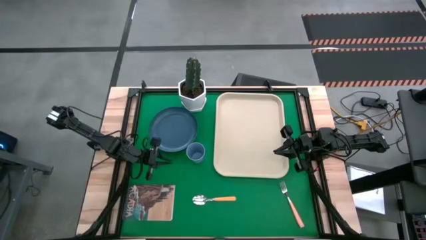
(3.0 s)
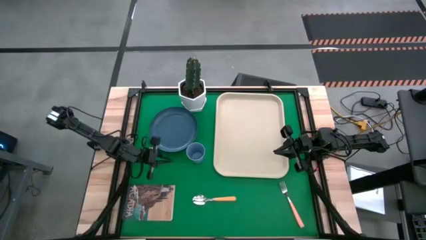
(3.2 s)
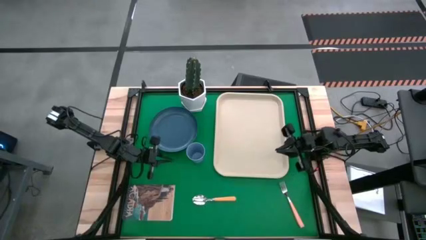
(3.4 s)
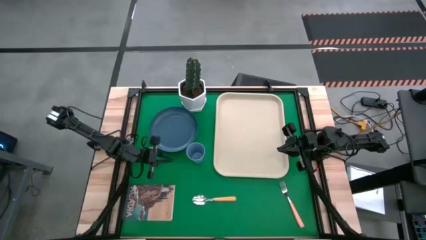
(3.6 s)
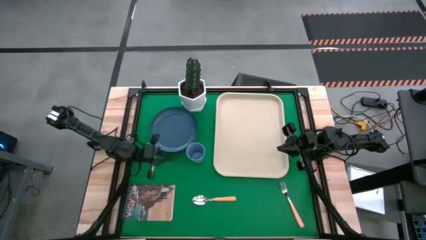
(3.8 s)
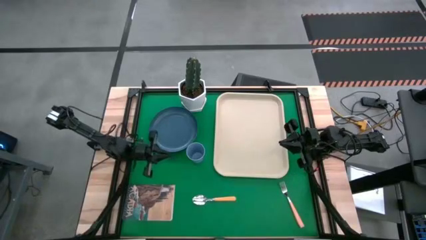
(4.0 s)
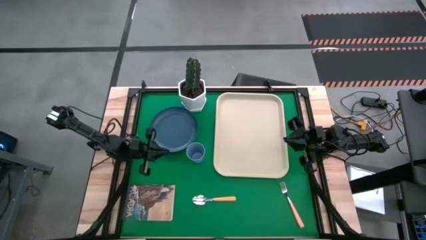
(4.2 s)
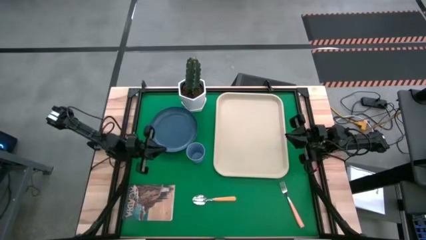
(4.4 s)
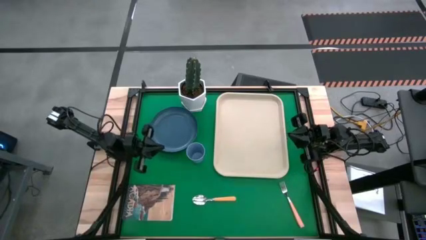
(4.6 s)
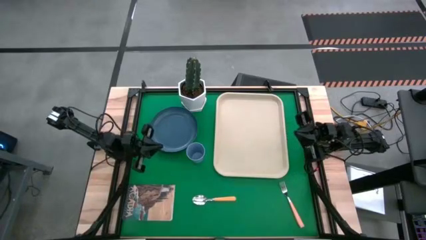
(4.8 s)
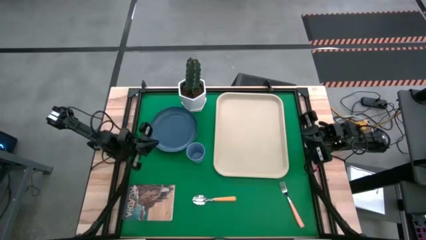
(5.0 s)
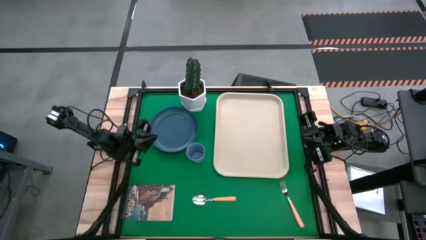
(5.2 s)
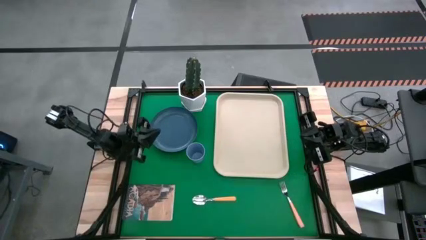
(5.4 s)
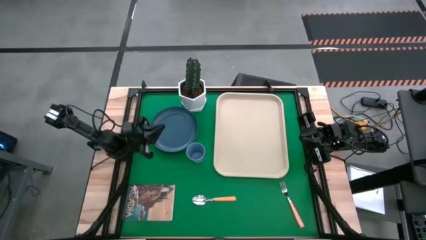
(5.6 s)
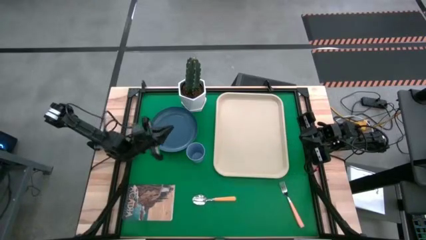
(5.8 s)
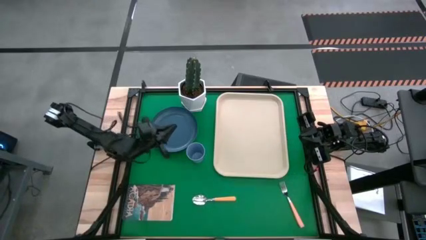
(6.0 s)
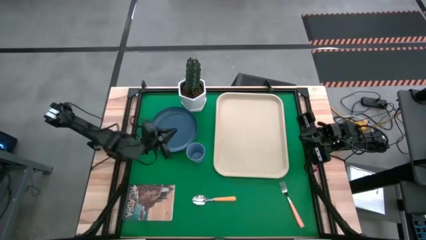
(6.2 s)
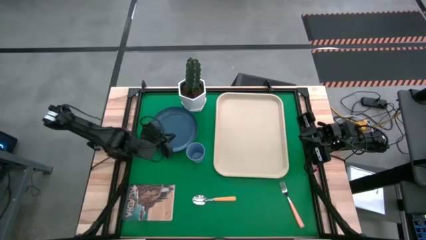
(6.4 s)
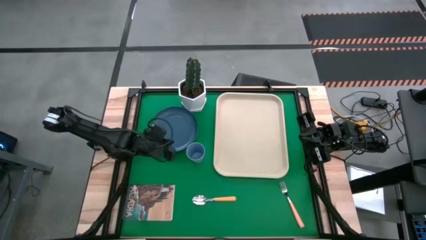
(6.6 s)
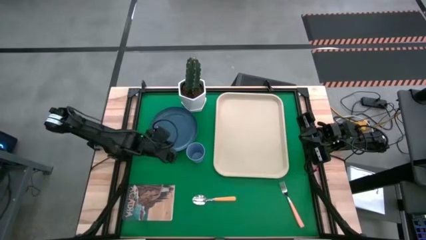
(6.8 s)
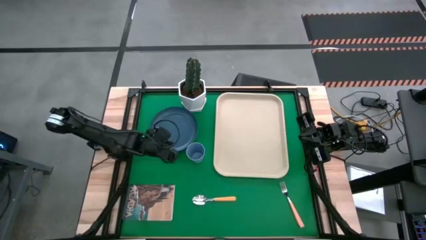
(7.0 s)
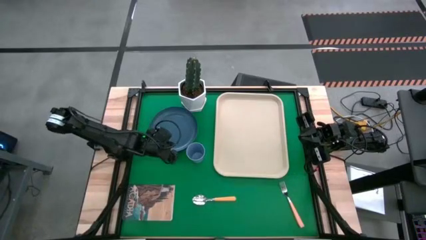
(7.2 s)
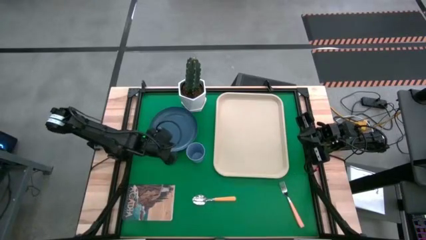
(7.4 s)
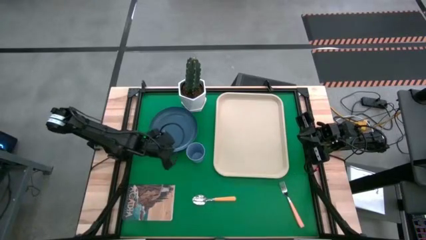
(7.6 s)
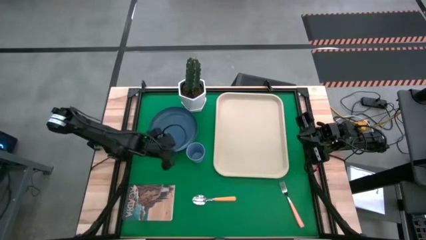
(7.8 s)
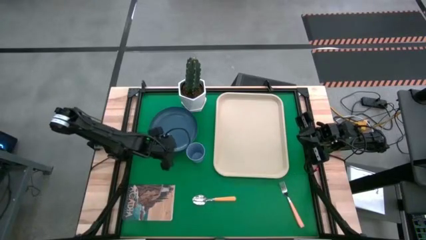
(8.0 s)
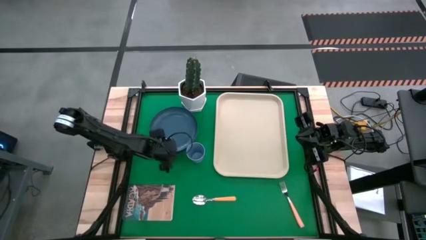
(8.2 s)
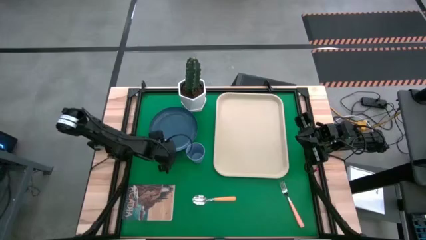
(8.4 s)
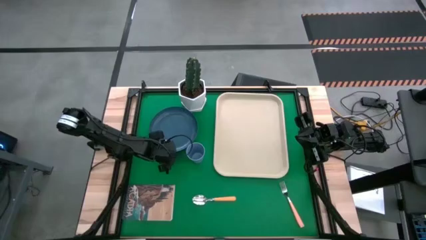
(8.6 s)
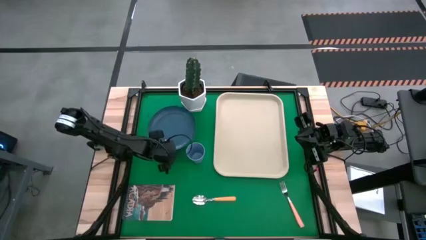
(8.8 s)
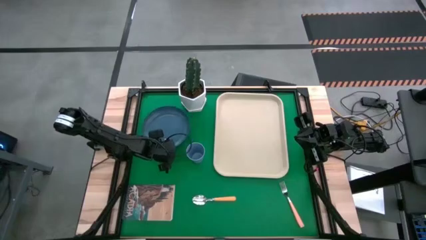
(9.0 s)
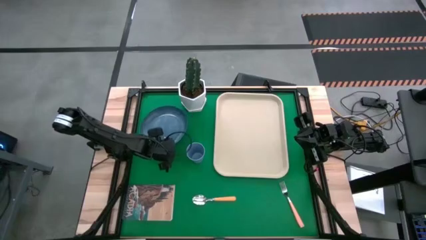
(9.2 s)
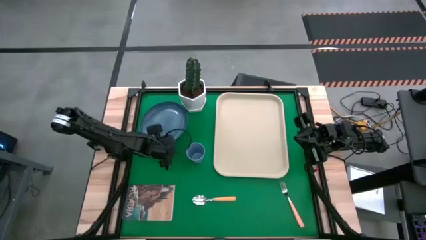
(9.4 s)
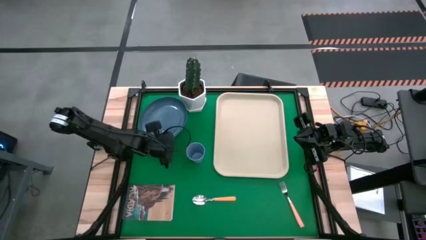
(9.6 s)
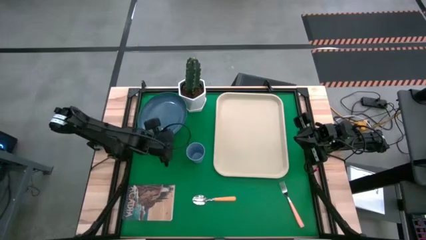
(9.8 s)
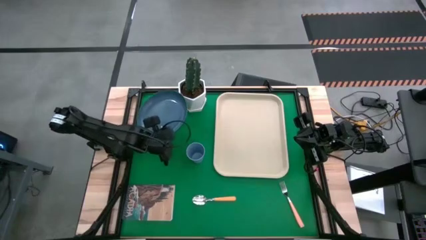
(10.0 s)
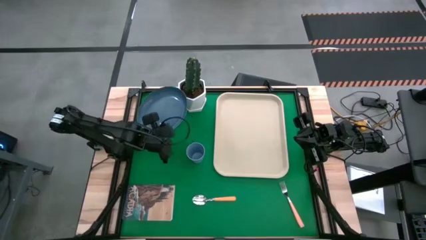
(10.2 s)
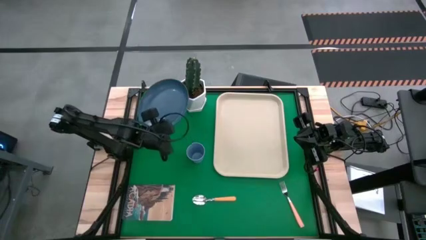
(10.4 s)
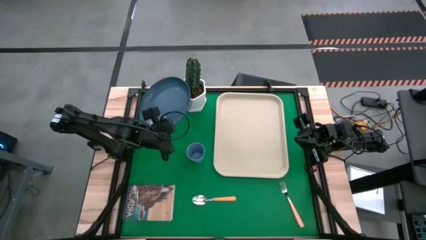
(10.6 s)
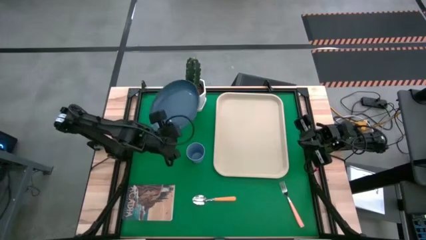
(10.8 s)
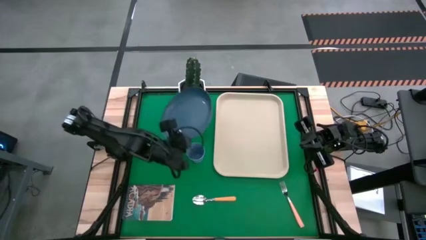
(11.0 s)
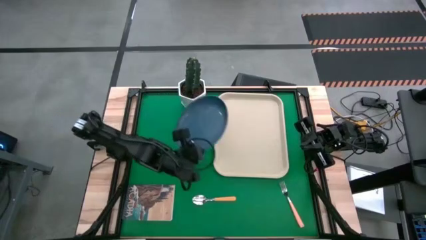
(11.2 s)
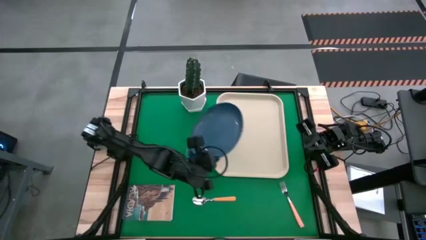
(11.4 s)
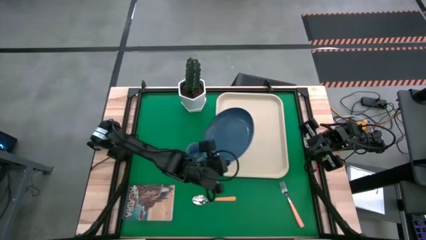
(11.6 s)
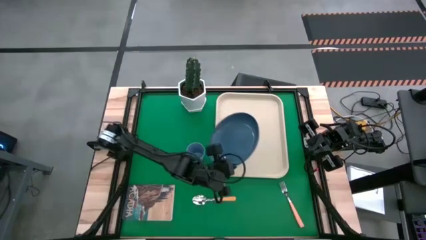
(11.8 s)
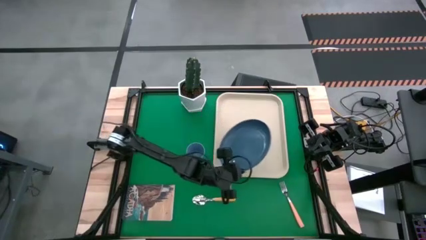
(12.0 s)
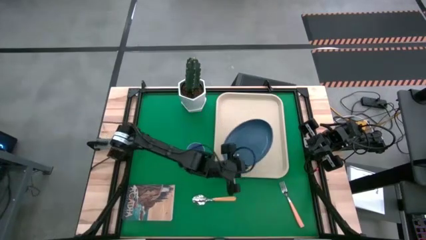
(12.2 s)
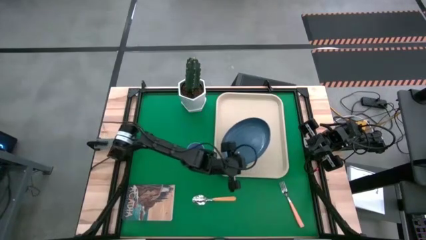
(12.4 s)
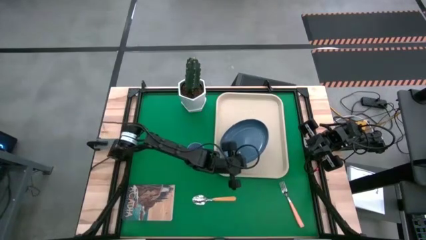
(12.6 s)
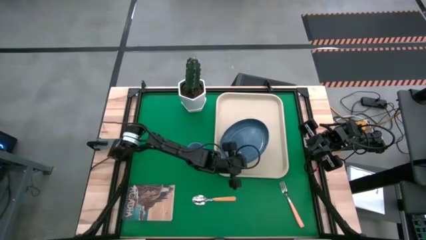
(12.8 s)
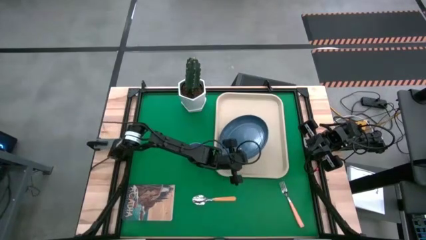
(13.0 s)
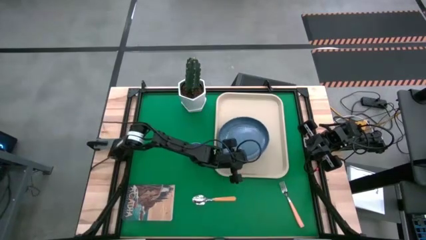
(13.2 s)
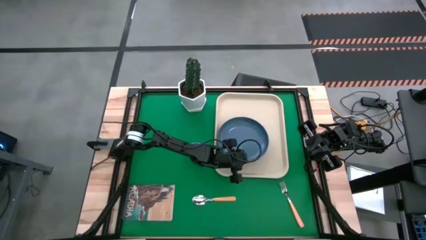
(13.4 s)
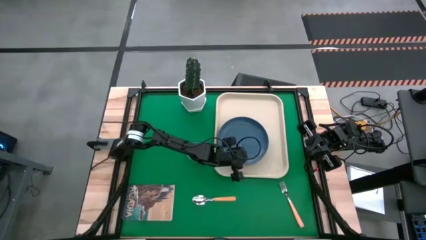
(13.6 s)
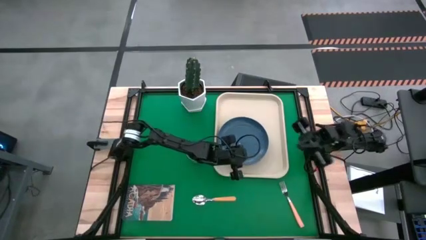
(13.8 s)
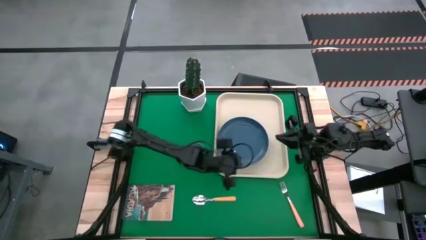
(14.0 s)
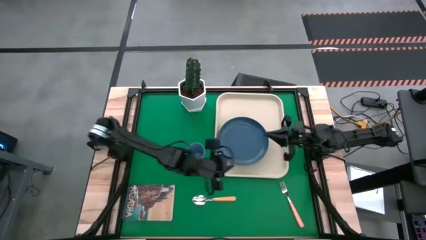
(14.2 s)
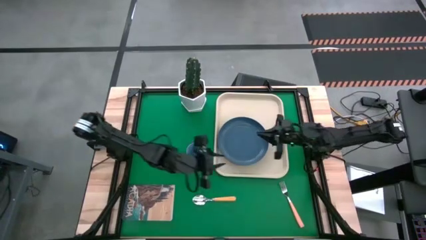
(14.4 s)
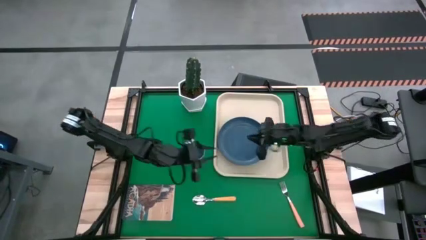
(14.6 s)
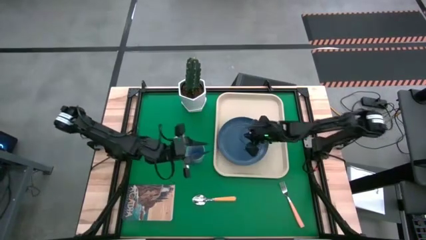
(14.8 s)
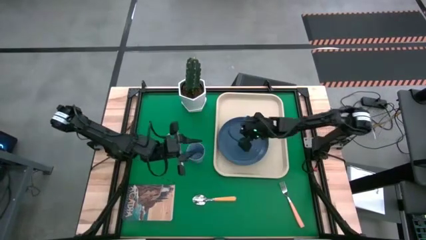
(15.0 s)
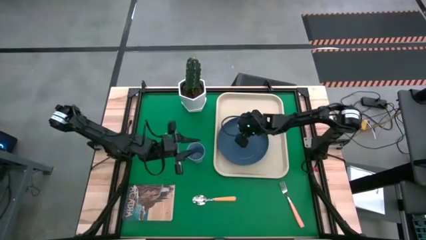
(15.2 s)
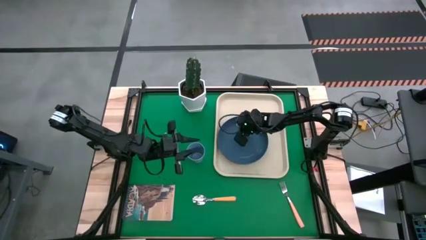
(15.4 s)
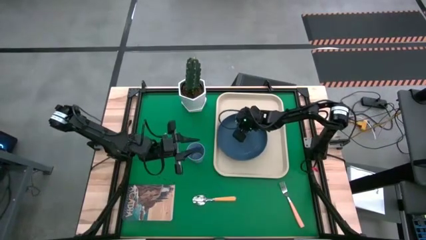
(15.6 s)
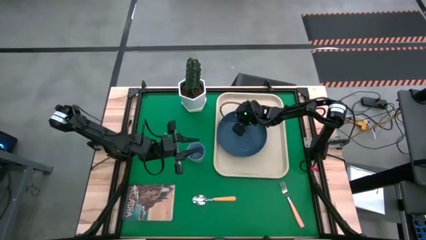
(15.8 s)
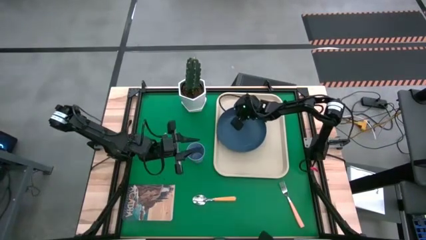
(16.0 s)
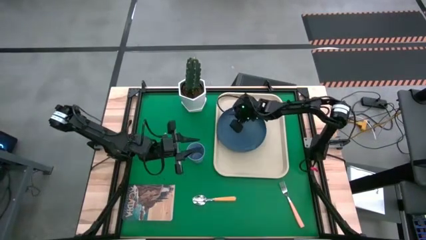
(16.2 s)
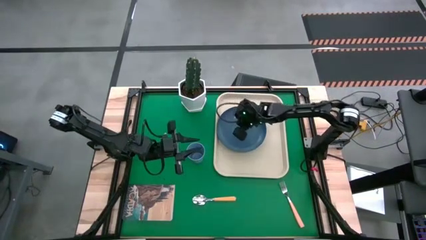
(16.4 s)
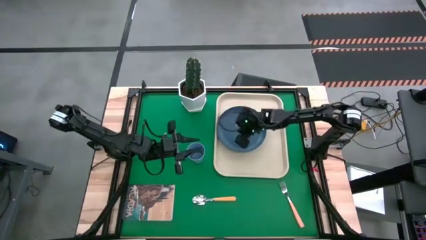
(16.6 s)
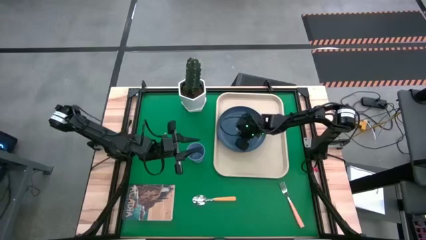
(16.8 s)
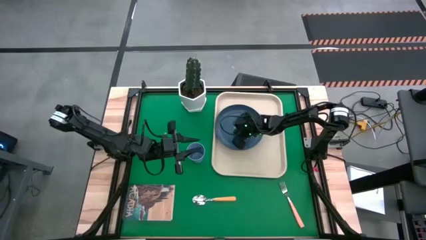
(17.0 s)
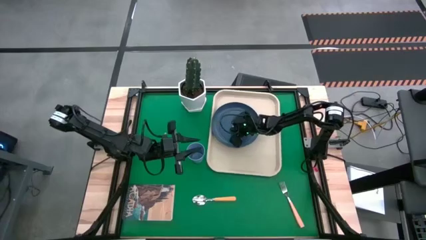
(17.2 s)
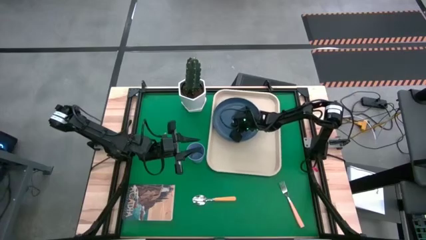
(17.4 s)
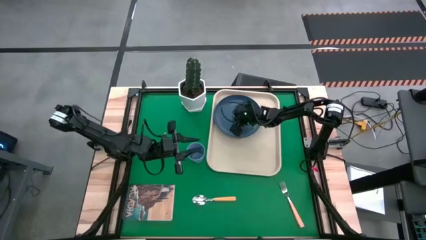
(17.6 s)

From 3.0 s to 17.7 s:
Task: Pick and place plate/cup/fork/spoon on tray
Put the blue plate at the center of the white serving tray
